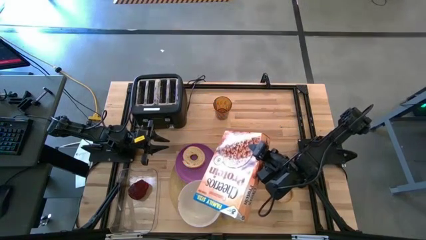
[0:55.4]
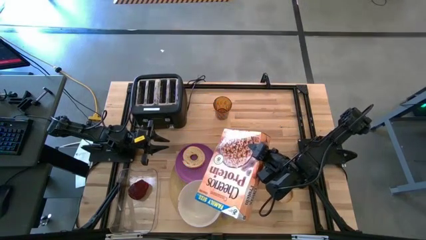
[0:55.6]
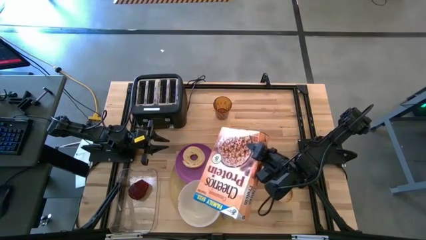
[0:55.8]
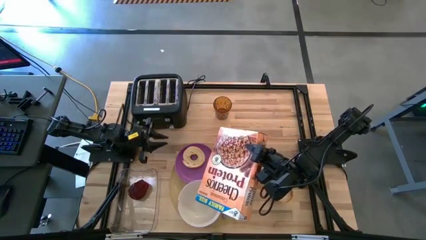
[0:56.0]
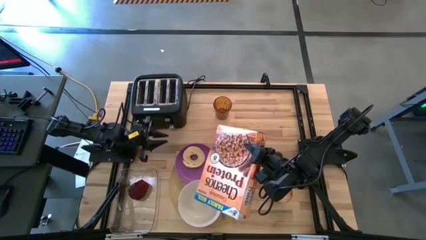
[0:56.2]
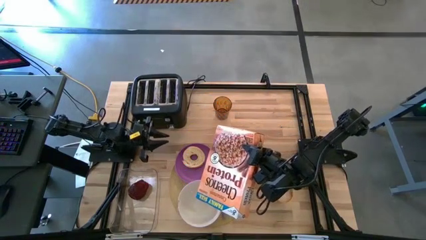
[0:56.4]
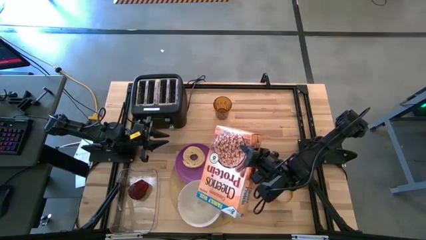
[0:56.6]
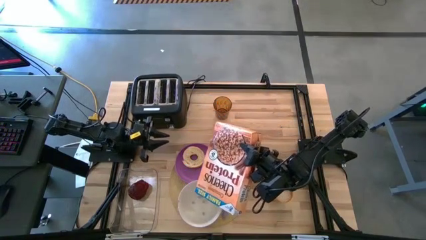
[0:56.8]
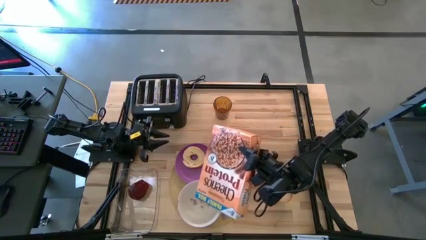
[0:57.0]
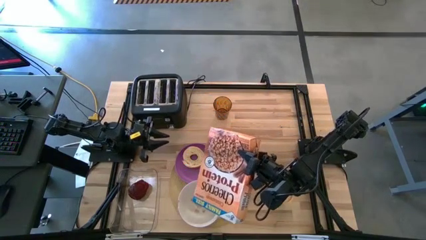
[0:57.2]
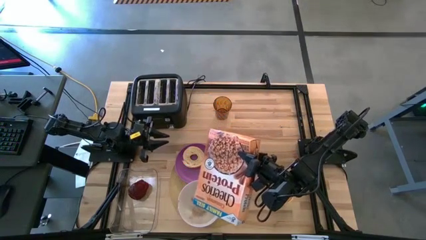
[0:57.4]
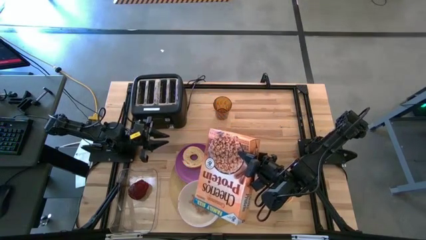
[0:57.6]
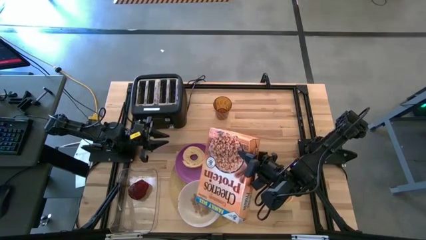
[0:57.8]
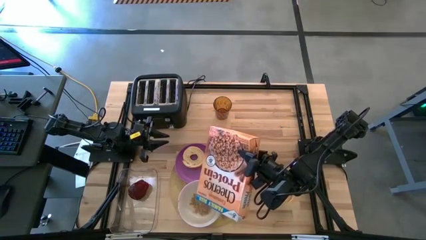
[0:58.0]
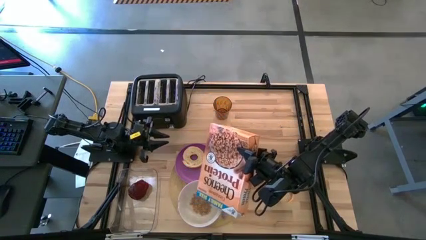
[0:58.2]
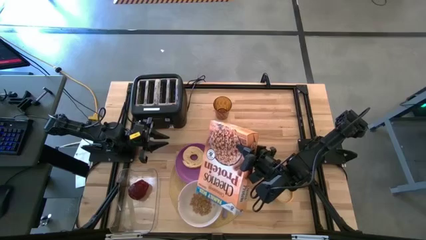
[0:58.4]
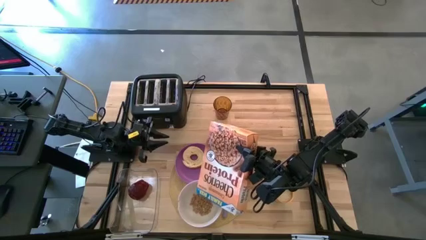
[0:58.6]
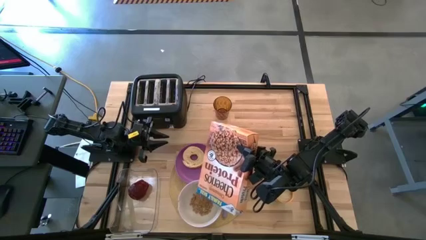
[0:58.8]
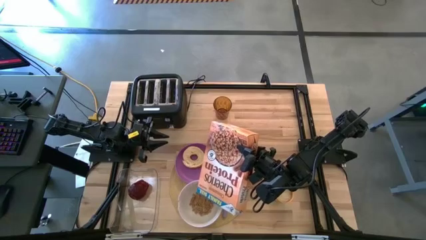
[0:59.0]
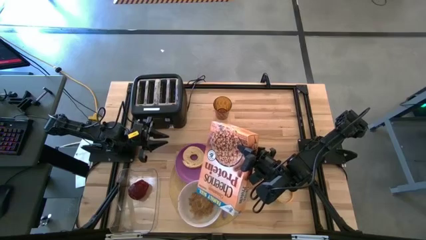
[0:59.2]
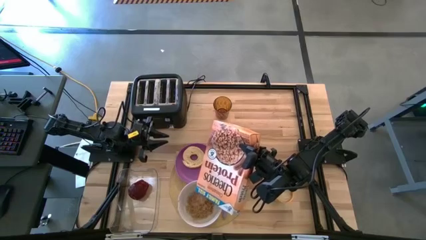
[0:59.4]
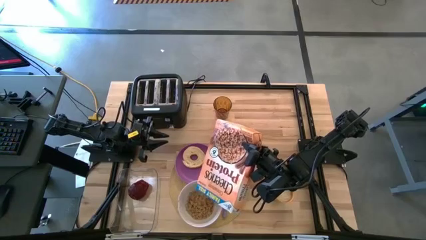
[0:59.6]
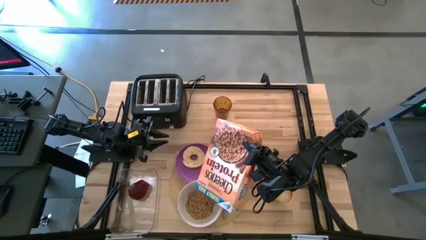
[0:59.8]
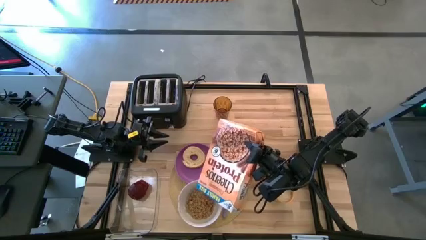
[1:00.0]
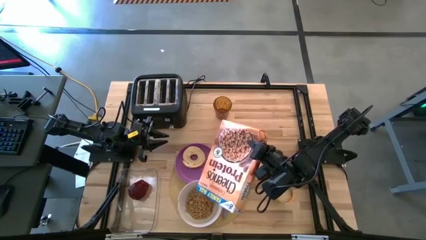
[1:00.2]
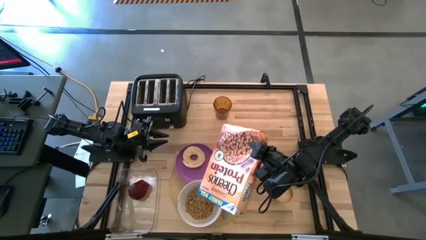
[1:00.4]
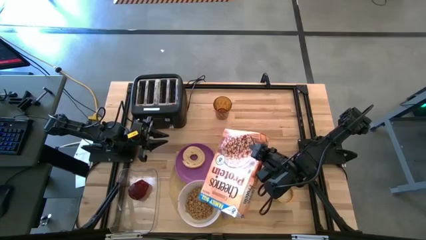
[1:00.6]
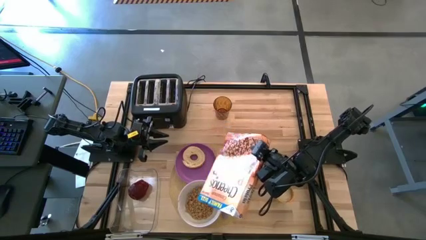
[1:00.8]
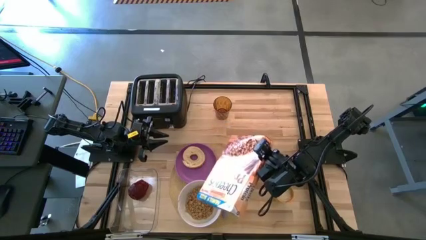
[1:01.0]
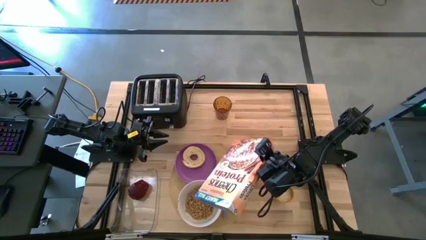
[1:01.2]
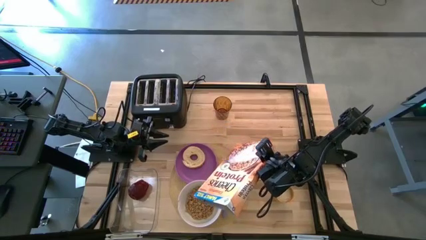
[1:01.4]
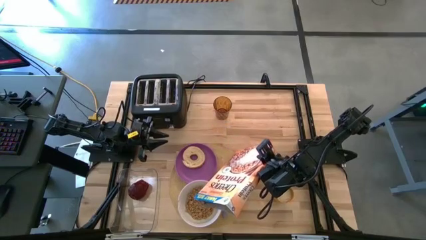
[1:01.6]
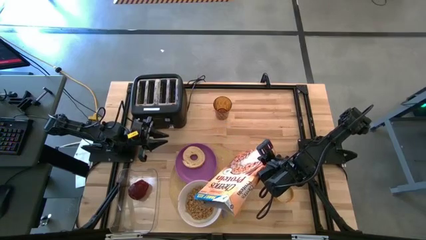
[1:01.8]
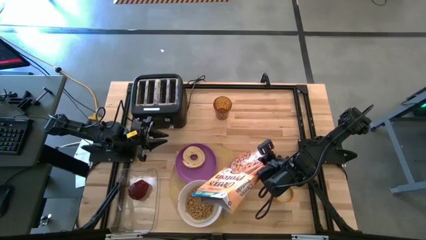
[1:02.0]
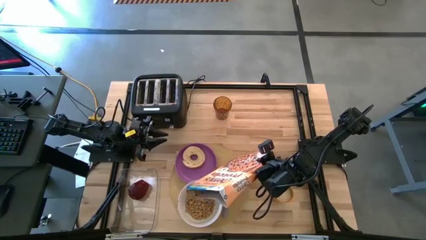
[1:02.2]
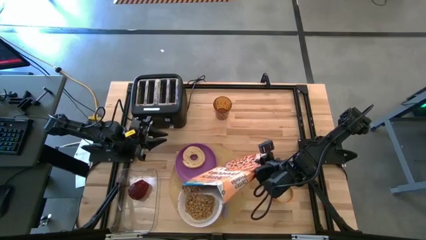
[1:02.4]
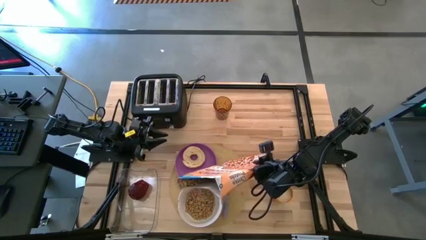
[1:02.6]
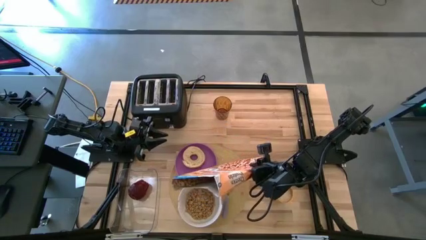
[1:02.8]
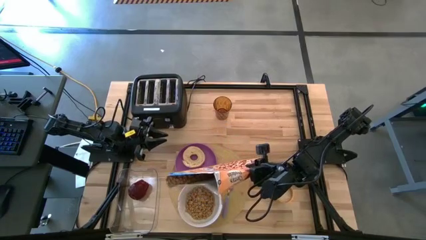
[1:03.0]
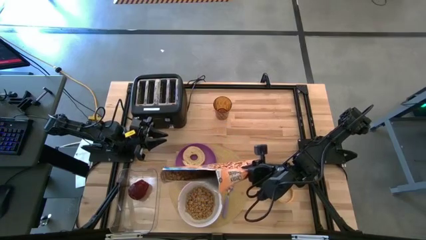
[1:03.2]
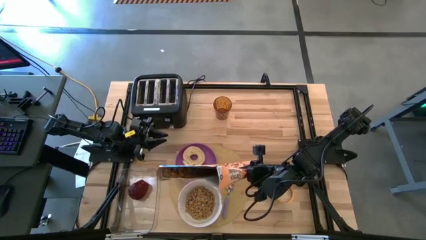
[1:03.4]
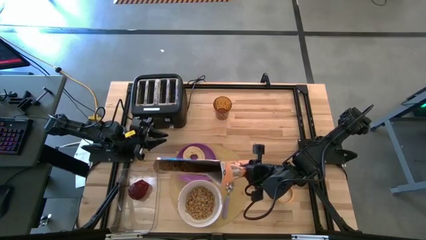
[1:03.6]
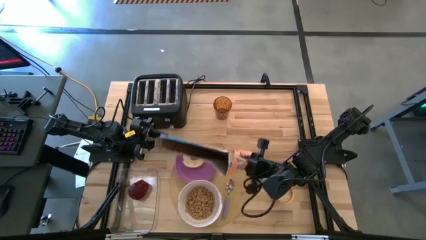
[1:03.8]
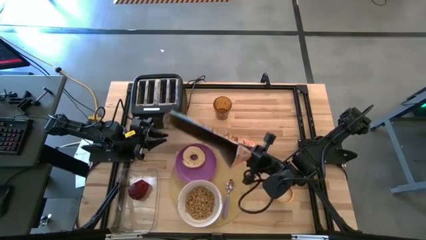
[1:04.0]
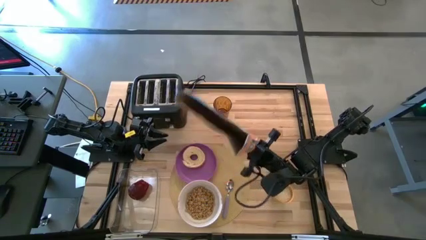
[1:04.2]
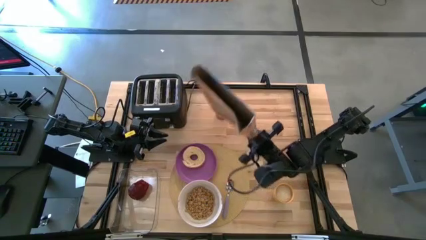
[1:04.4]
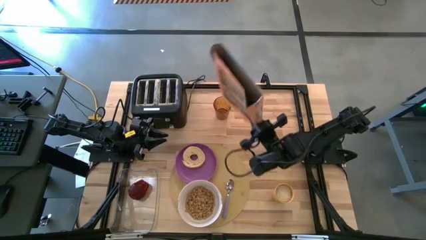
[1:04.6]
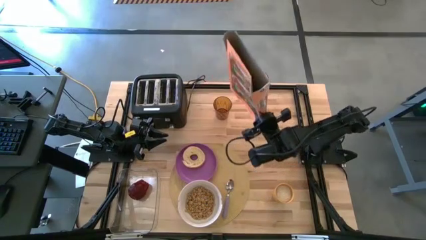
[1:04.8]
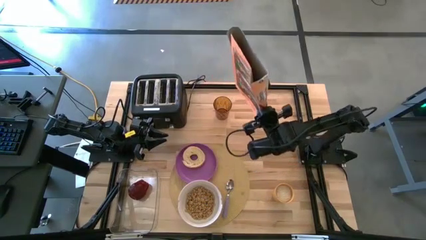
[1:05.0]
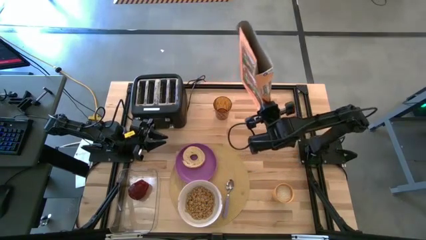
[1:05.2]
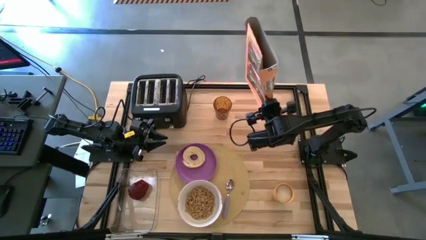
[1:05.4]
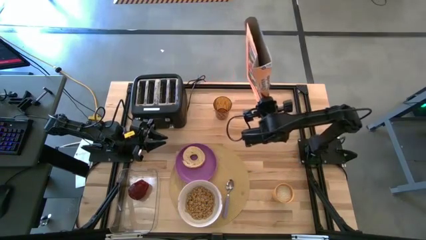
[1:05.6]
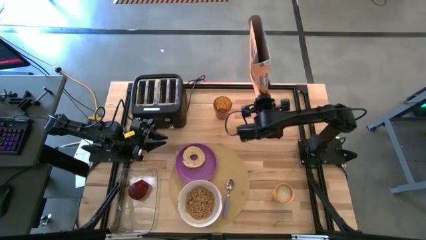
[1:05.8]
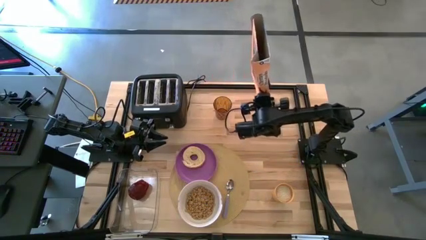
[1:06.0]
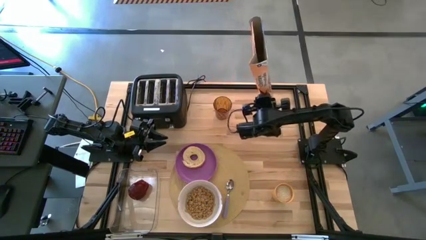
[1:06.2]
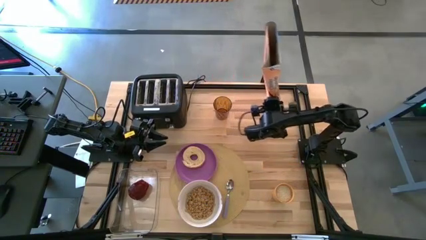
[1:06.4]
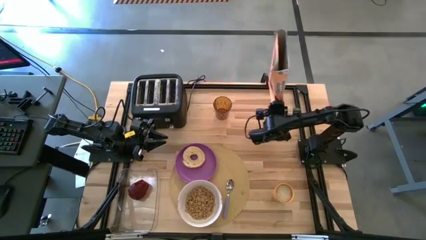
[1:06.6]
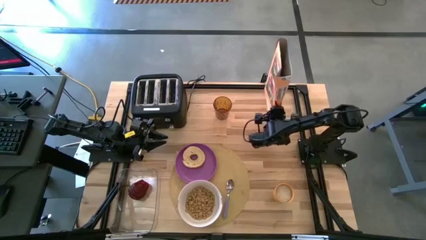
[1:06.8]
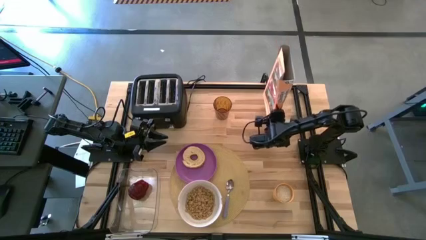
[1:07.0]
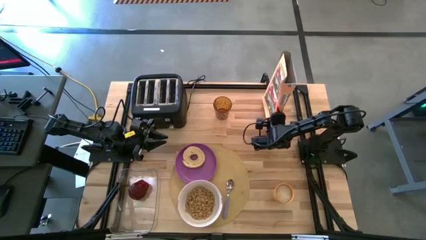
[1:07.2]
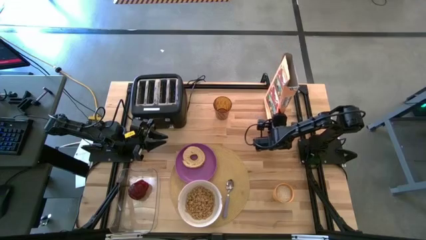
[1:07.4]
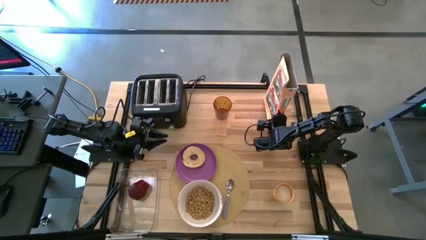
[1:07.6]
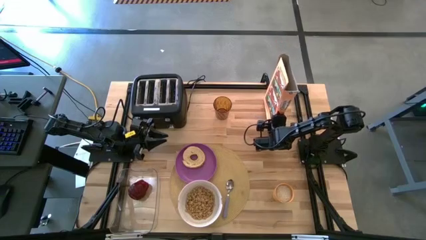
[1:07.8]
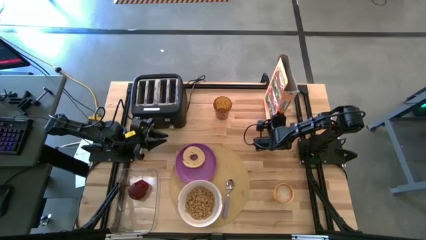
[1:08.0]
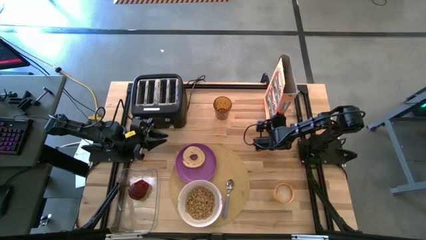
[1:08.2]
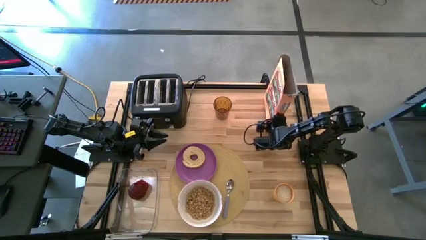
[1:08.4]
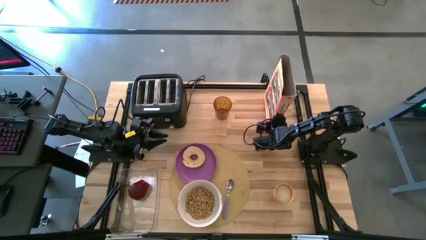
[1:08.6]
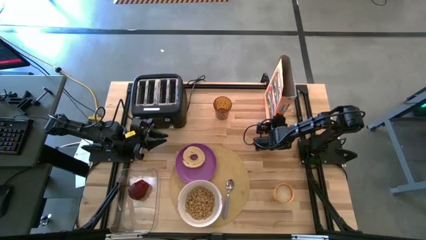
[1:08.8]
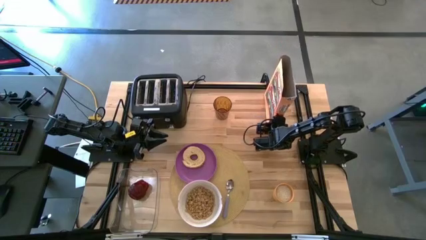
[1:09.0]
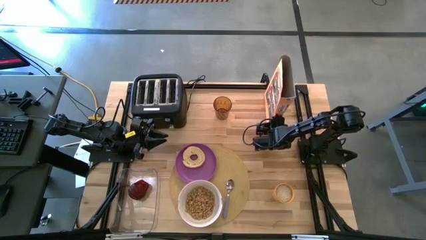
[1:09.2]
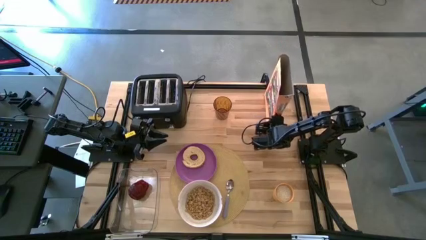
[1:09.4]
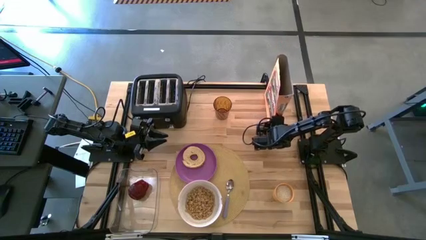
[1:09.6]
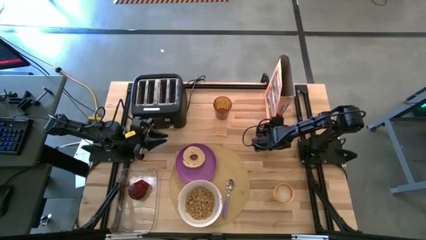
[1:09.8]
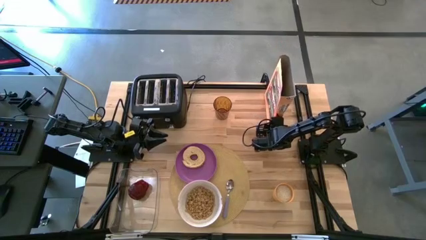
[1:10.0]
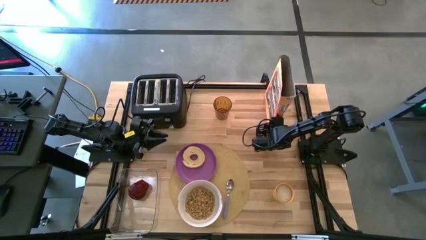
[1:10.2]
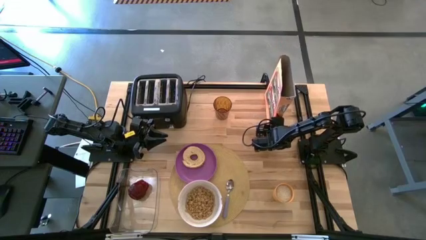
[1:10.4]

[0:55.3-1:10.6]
Task: Arrange a breakfast setting
Pour the cereal from the box into the white bowl

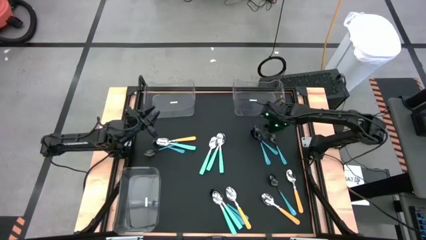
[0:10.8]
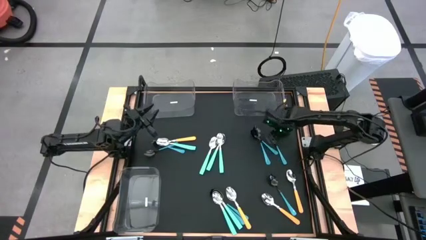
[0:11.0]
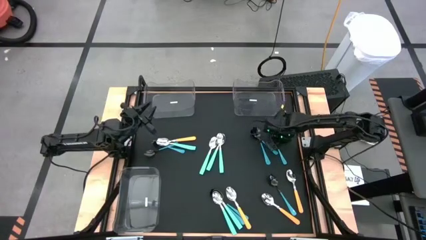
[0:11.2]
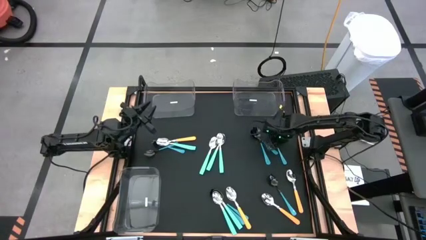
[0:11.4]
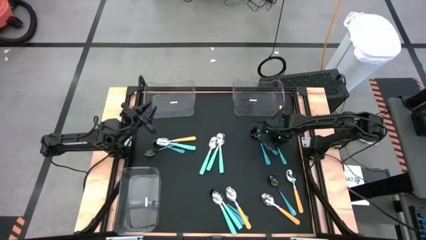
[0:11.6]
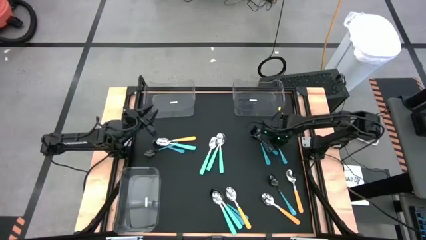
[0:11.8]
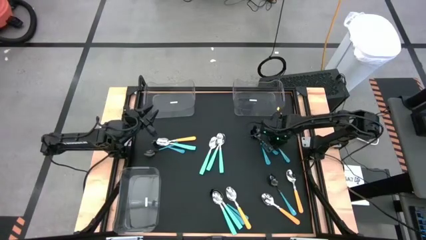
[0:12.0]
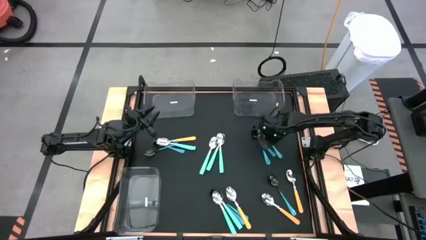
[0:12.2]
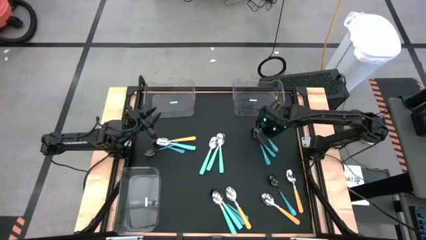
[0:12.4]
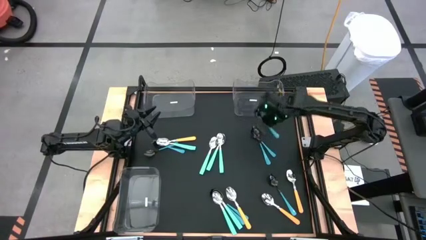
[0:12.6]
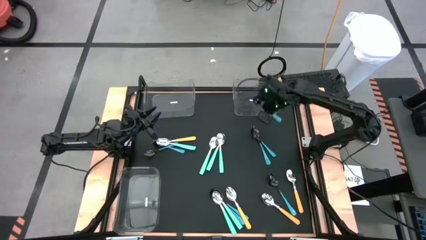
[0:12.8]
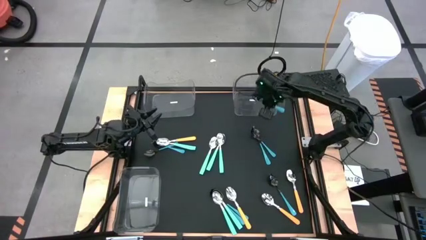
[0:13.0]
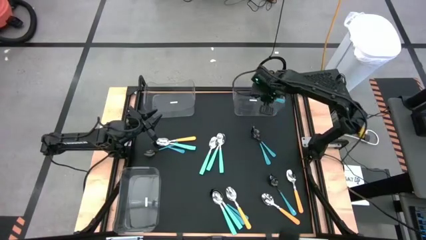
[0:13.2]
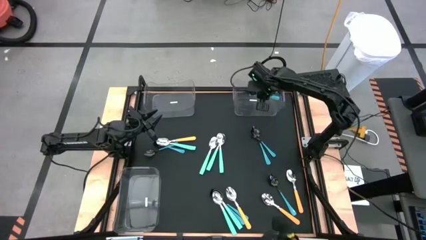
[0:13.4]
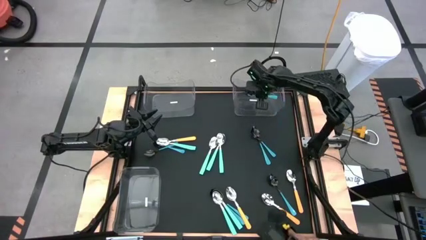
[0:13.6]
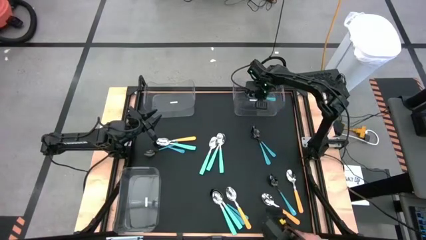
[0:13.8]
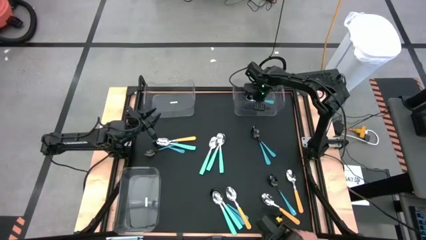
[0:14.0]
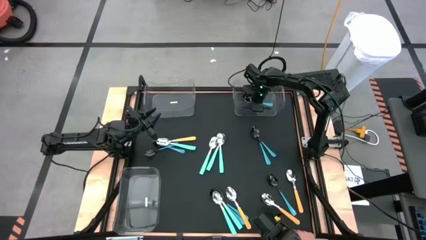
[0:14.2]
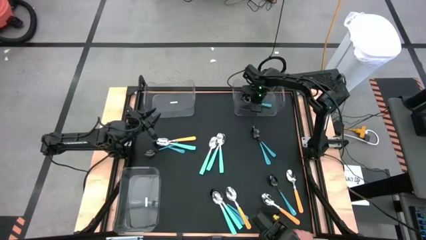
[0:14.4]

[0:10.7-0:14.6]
Task: Sort silverware by color (type)
Put the blue spoon into the top right transparent bin
